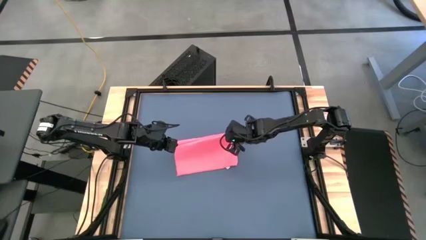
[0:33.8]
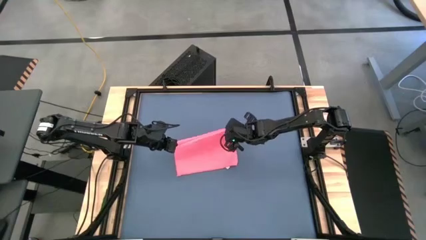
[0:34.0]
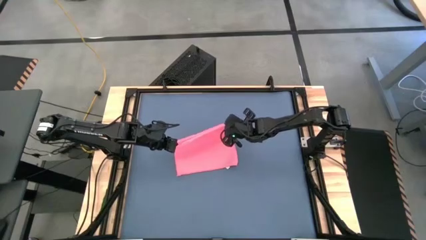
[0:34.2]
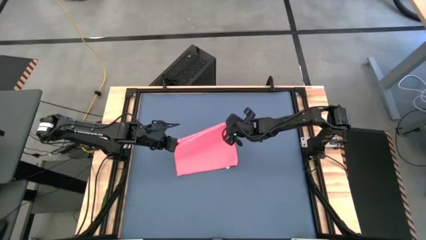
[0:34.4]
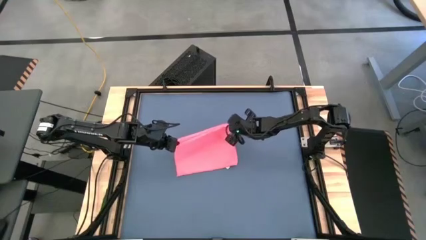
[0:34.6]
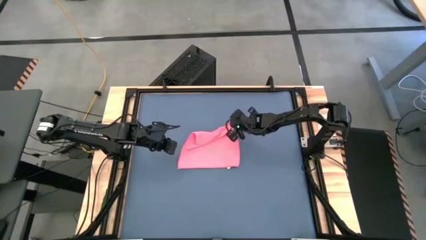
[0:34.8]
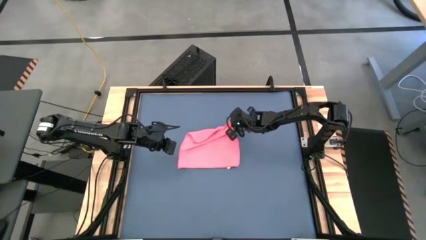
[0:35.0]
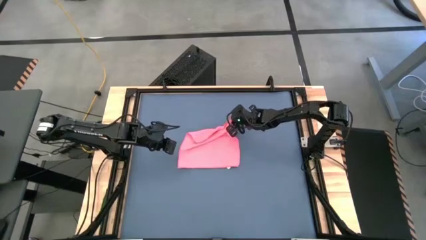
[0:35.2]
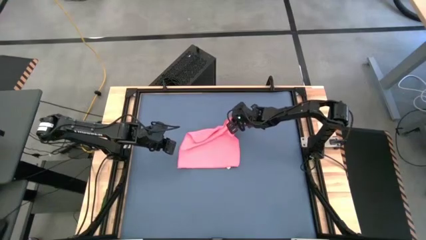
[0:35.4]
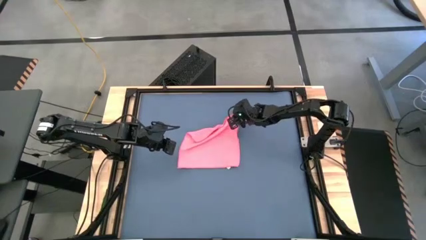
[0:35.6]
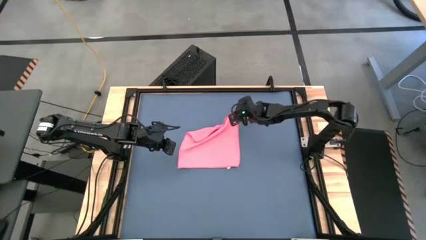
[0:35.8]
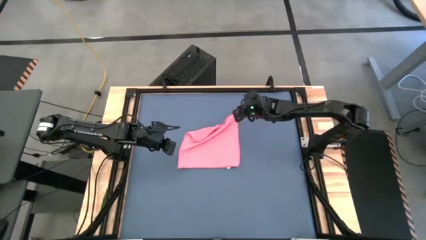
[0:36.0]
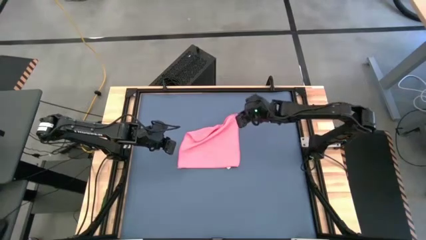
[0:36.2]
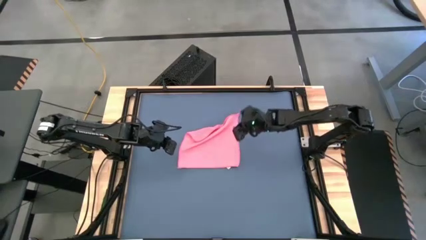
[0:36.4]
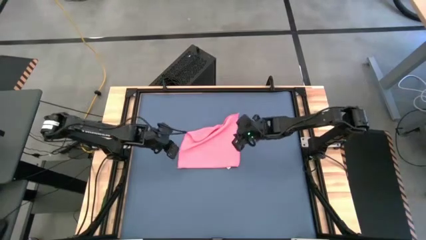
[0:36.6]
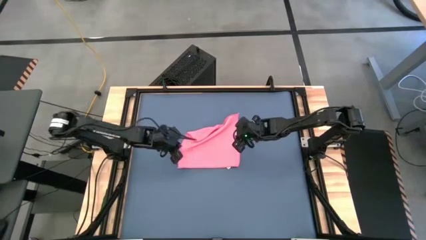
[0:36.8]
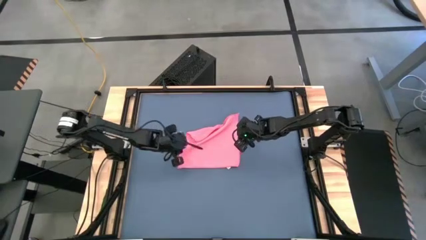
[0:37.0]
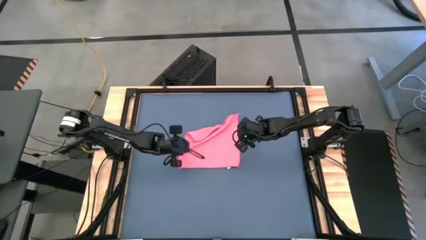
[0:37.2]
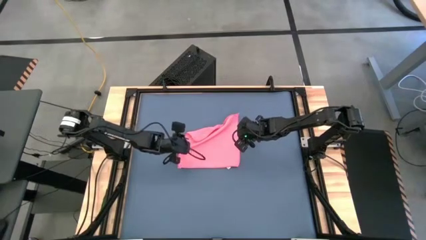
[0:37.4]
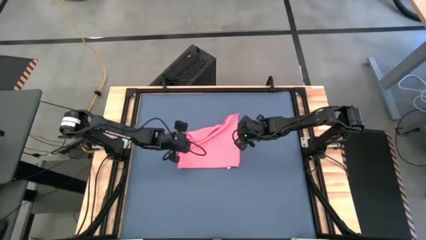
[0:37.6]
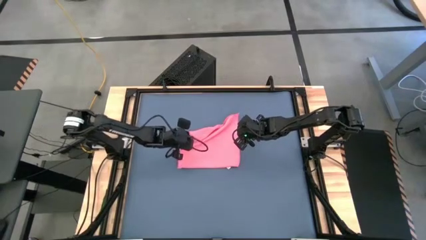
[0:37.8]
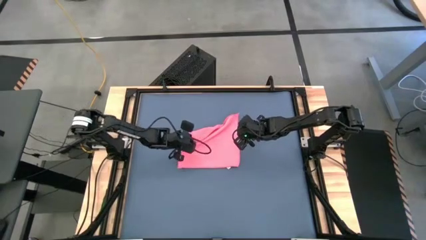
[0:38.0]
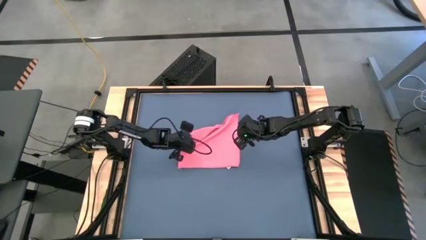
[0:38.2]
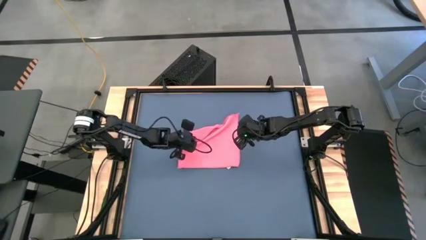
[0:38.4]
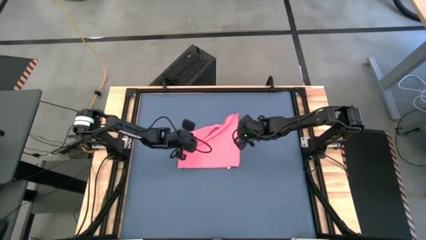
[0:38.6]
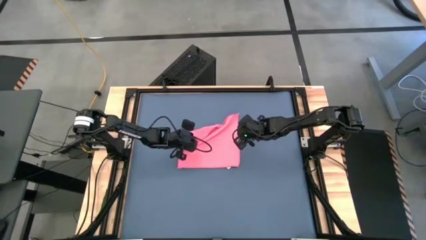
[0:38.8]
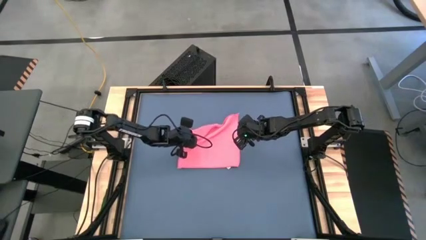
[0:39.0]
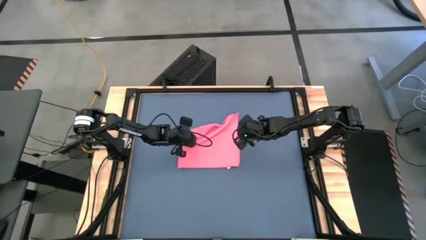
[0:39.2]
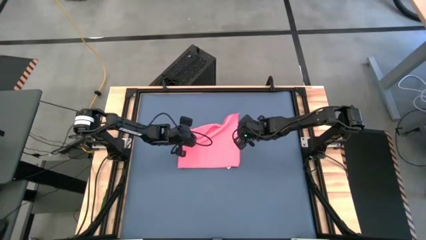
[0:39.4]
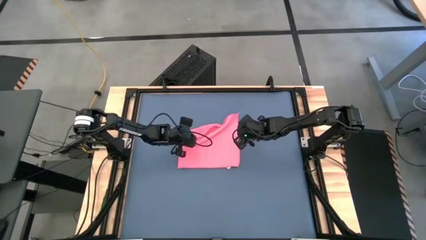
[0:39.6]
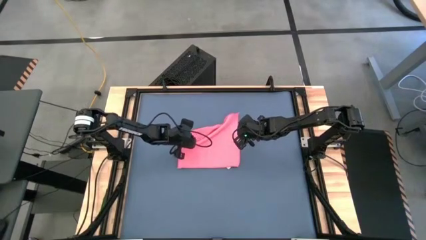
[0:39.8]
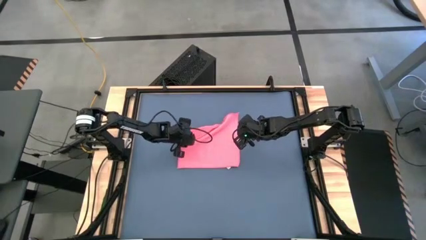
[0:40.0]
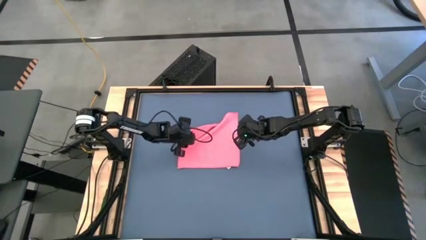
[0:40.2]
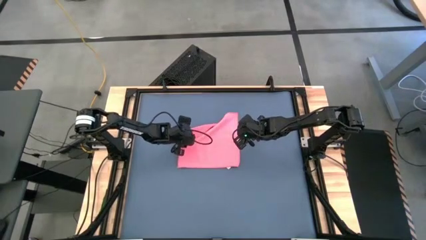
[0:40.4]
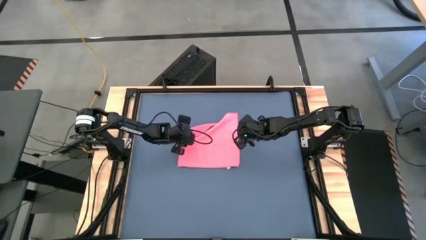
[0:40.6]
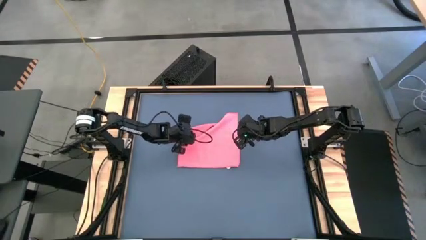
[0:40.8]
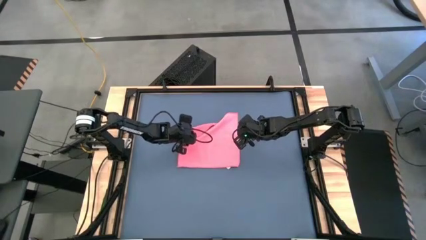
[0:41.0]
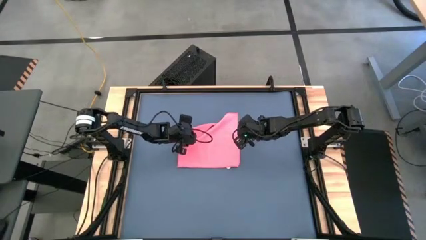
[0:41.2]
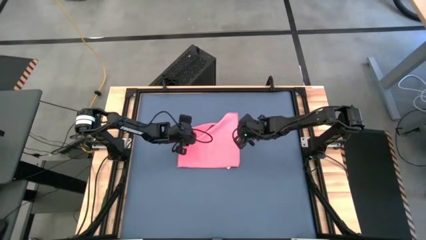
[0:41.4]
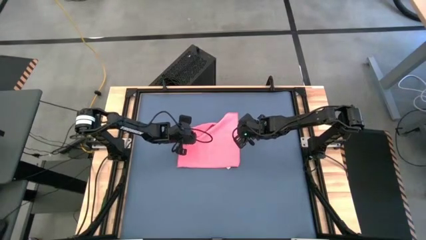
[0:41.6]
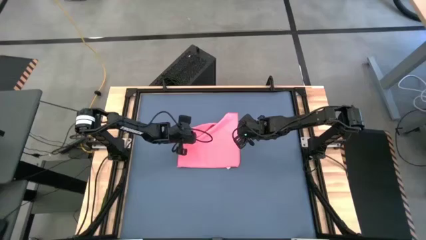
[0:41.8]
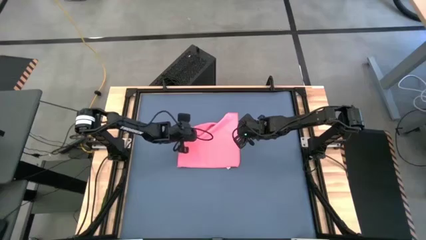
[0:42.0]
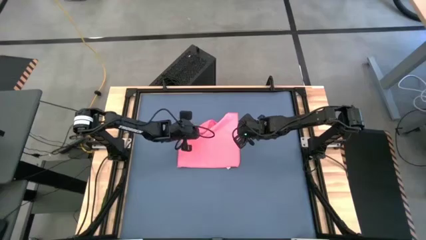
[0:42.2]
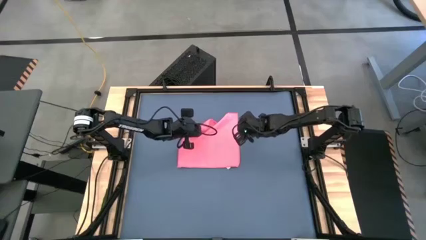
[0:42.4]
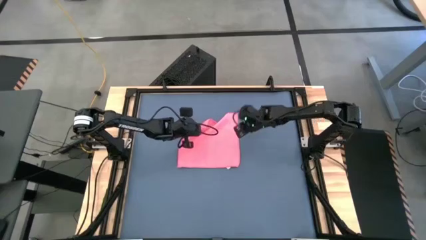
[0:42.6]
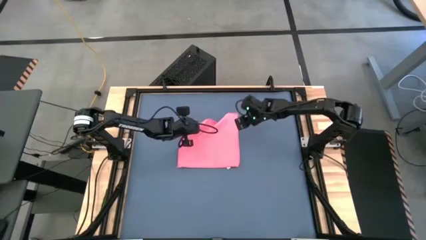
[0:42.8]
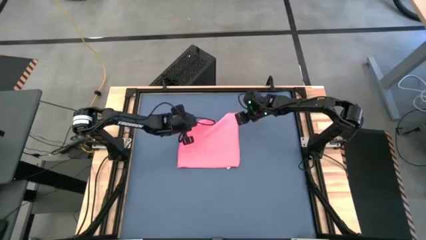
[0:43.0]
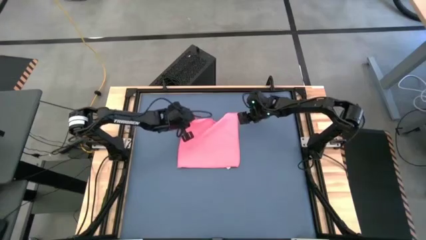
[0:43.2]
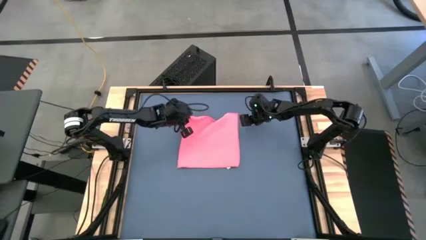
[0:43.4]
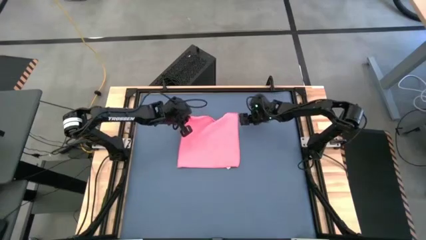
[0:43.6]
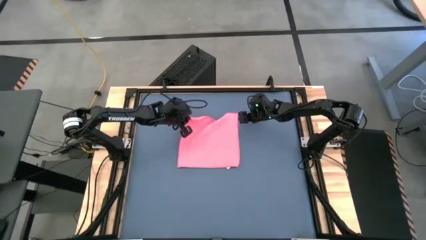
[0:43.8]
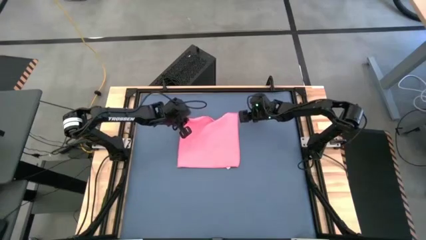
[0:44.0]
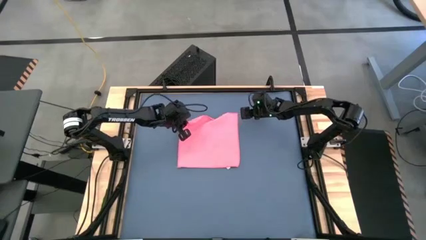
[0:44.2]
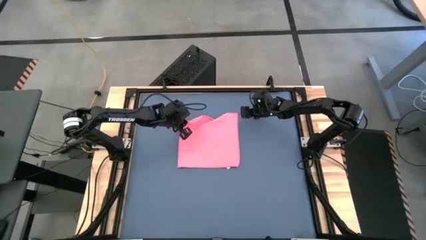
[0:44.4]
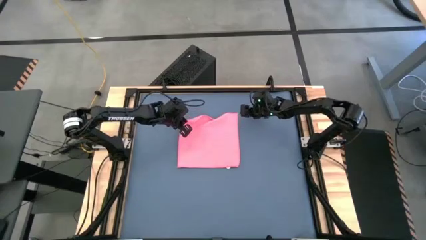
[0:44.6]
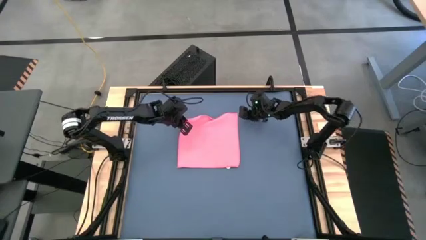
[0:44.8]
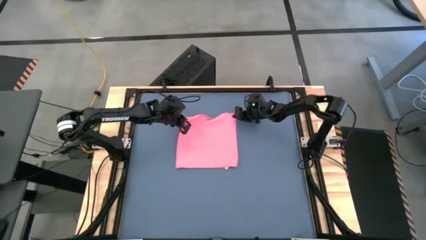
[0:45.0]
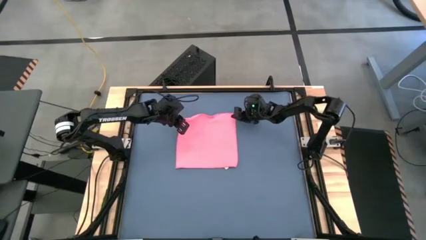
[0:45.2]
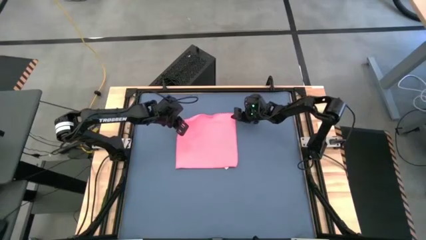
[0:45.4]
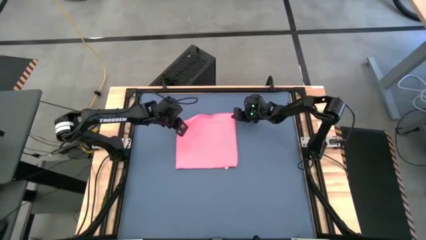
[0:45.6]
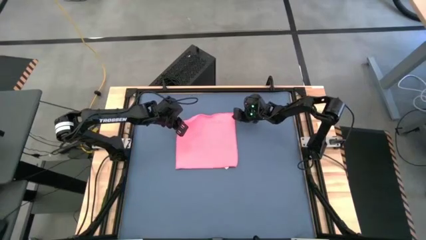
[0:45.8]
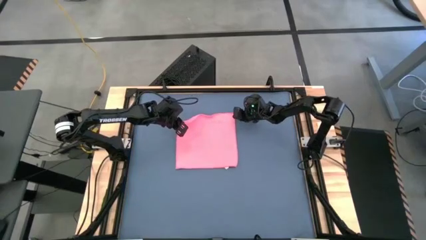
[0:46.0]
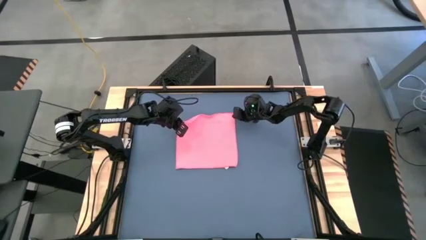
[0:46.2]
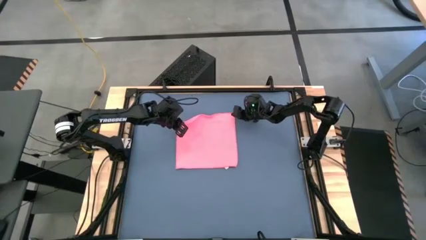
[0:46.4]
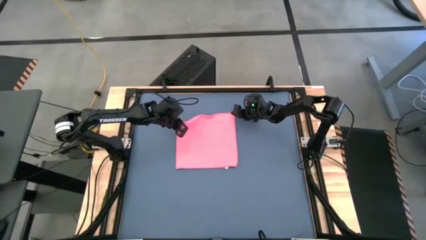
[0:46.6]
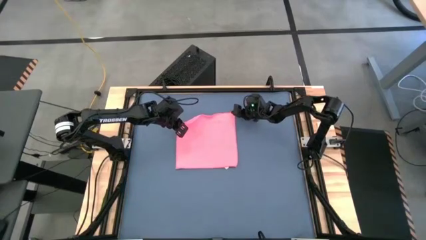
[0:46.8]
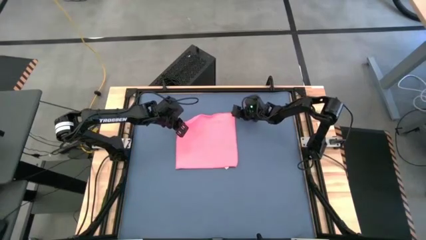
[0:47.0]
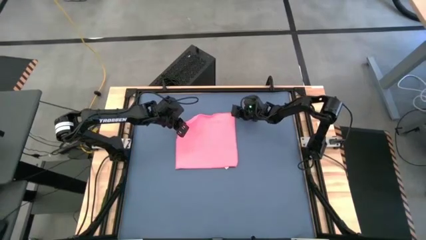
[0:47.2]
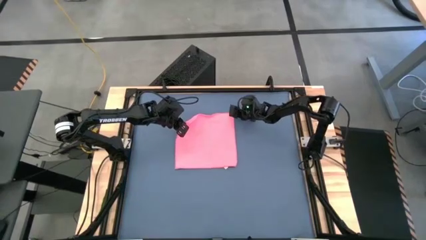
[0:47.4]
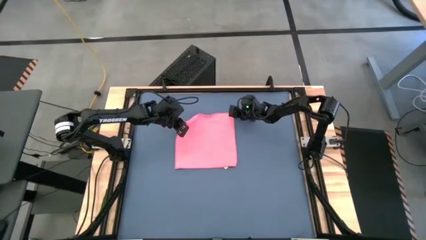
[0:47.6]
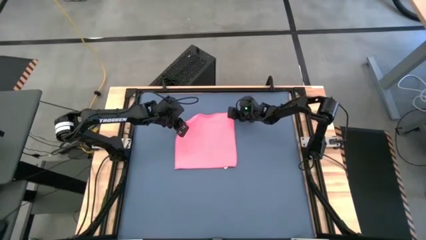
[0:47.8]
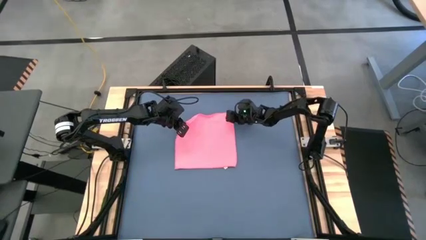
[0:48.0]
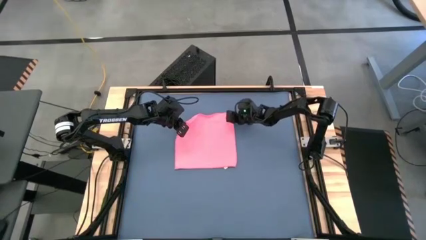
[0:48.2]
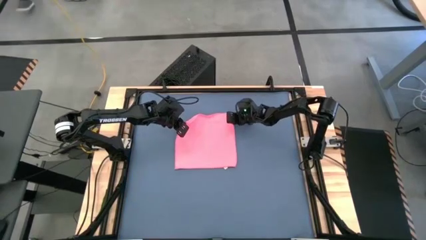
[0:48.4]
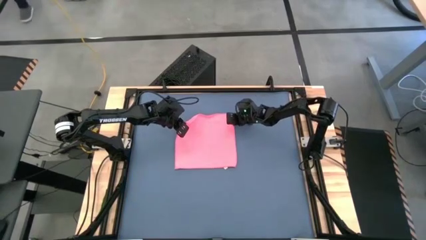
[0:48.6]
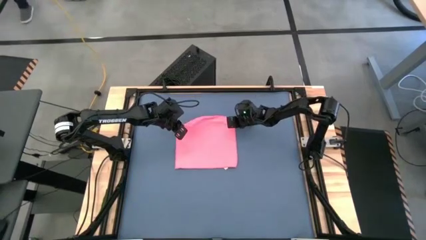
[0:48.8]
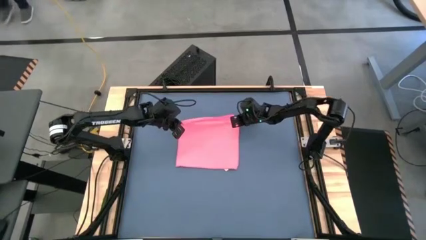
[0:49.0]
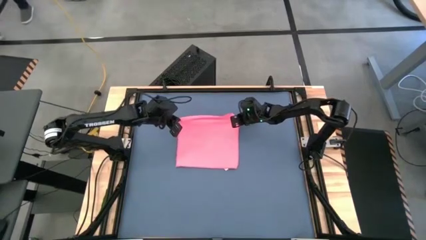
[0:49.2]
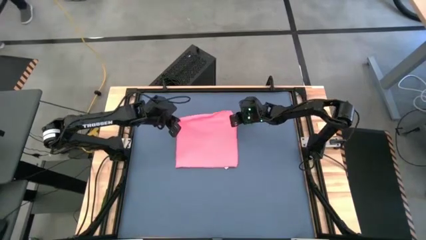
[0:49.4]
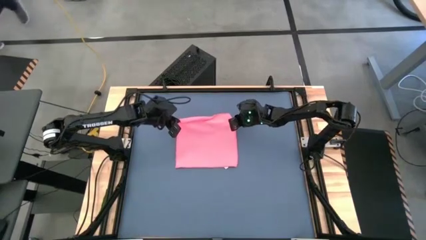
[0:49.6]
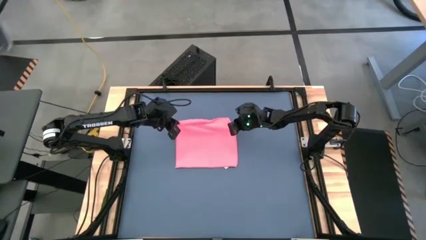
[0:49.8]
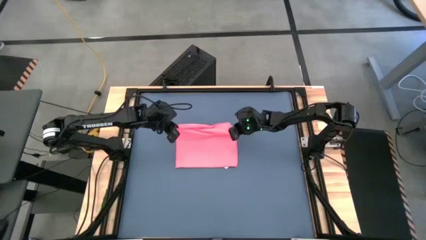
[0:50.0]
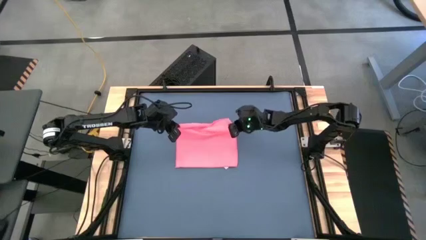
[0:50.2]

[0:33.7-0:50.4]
Task: Roll towel
Fold the pink towel
